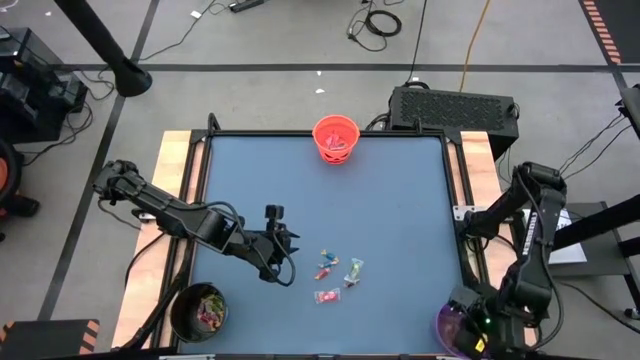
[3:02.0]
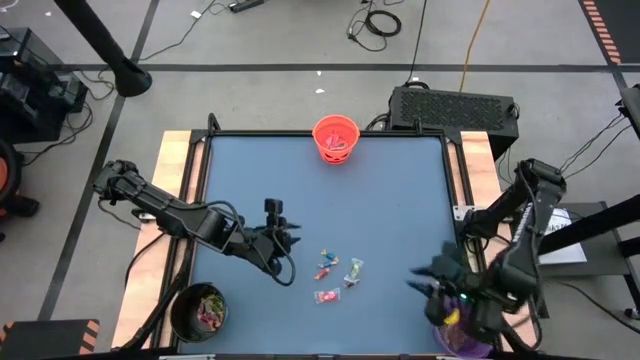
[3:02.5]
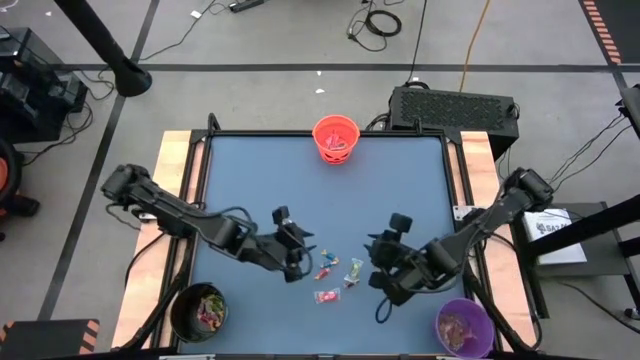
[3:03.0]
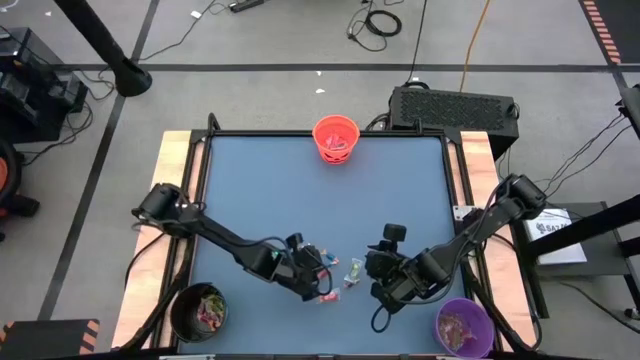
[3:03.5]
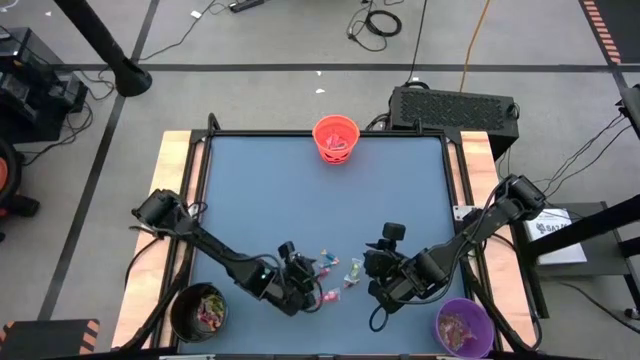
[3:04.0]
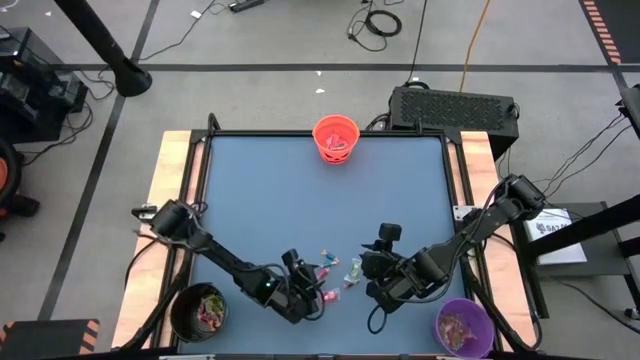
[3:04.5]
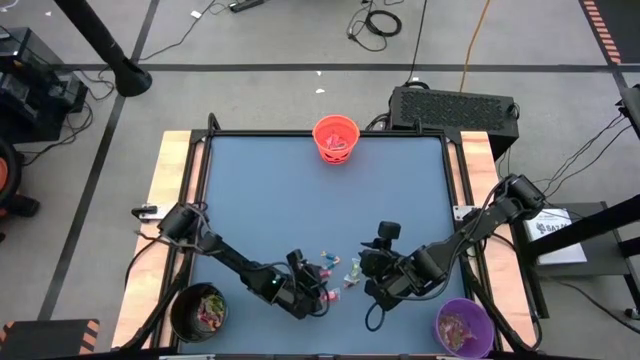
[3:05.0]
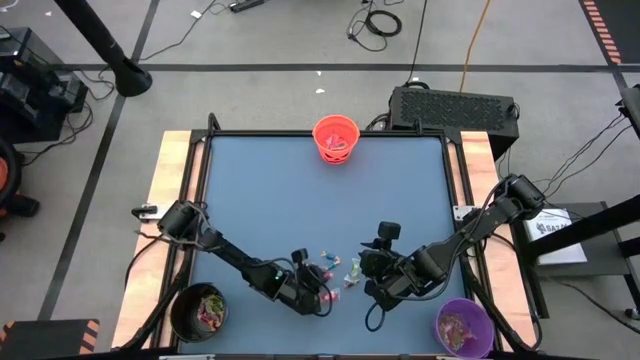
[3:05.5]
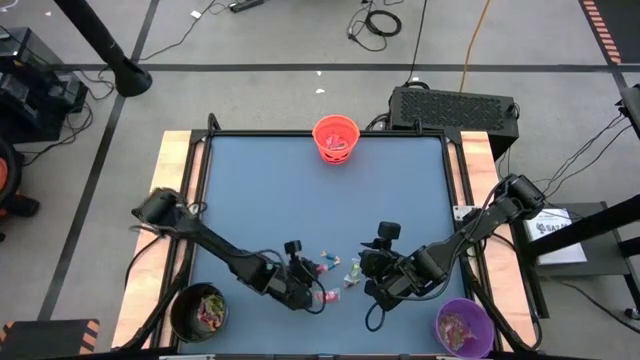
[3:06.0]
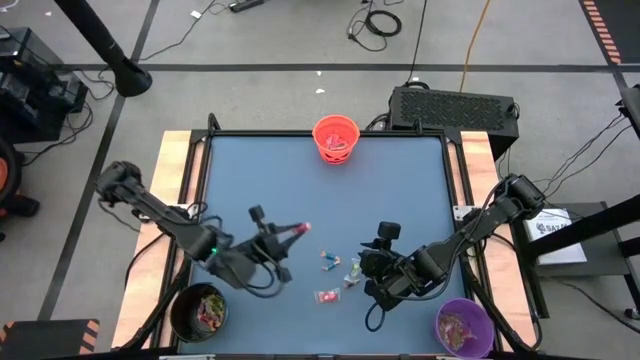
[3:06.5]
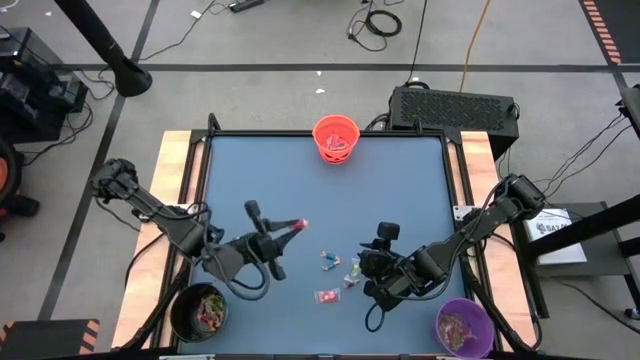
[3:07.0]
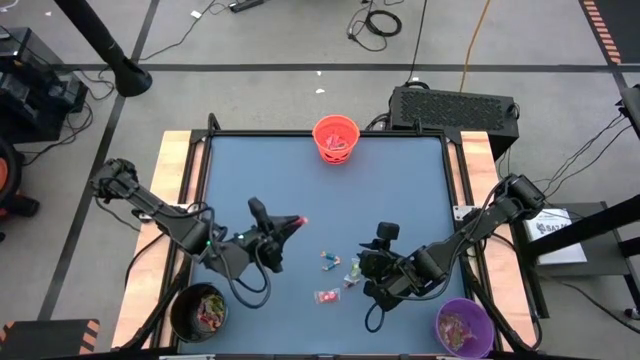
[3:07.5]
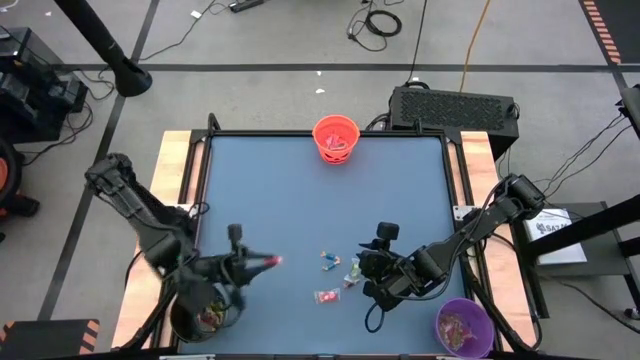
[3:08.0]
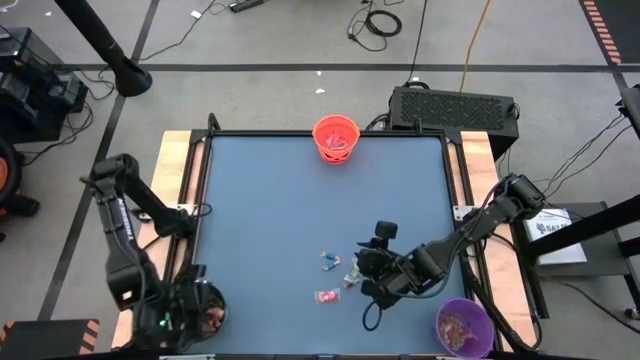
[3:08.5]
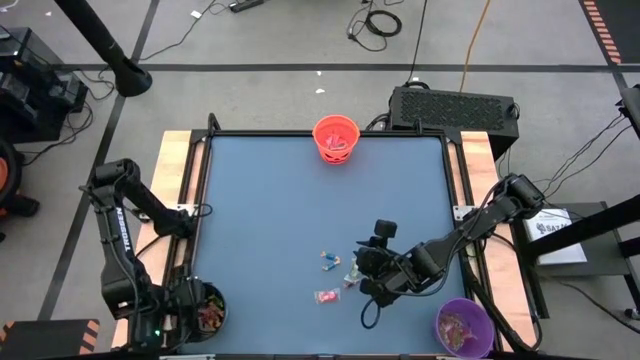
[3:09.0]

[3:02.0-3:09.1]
Task: Sort candy by brand, put in halloween buckets
Put the orange candy into the black bucket

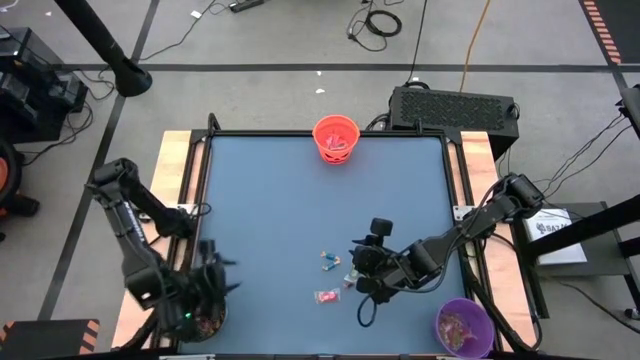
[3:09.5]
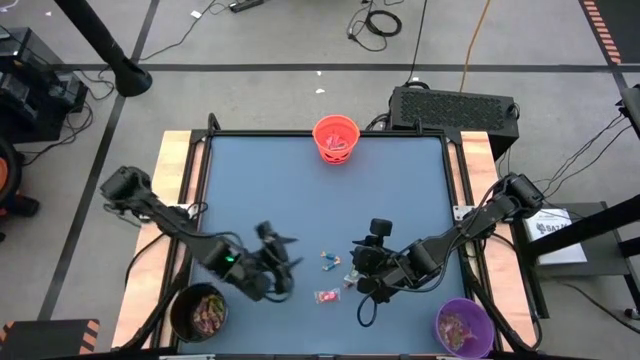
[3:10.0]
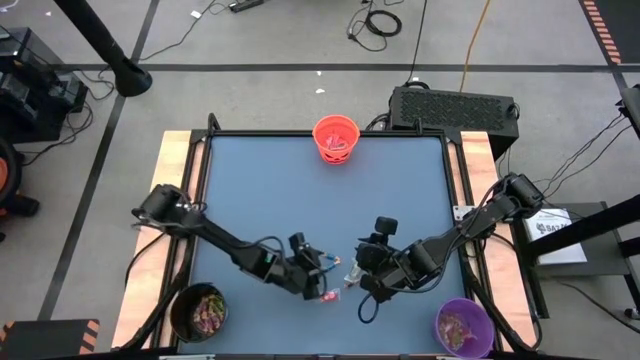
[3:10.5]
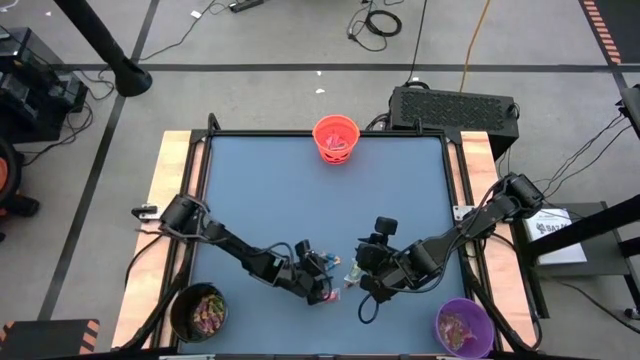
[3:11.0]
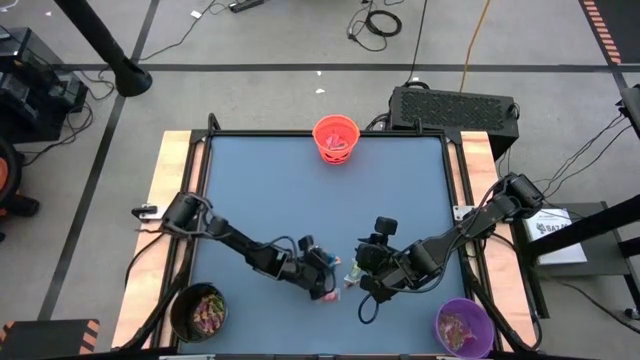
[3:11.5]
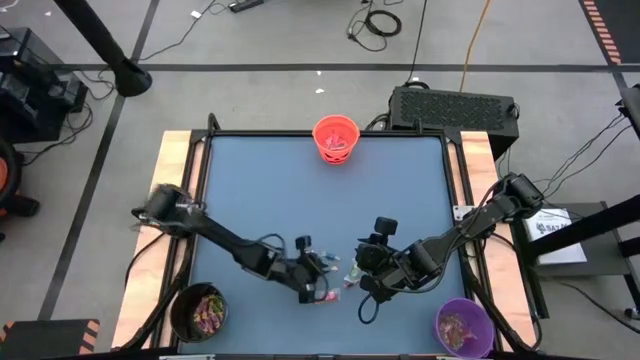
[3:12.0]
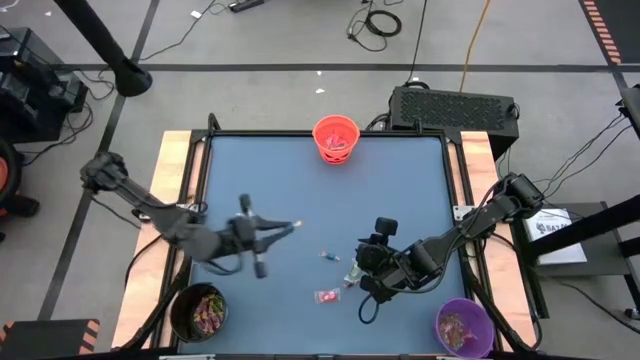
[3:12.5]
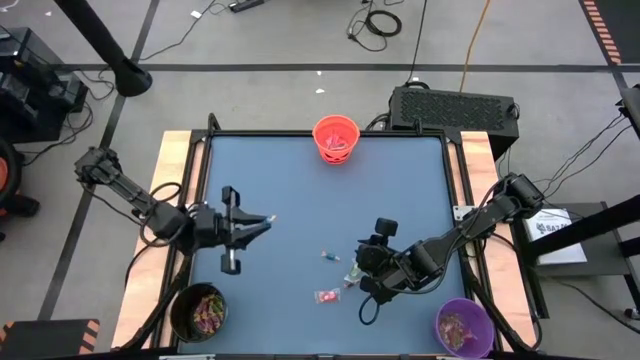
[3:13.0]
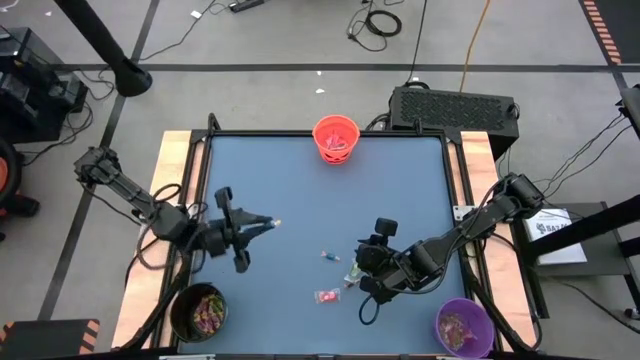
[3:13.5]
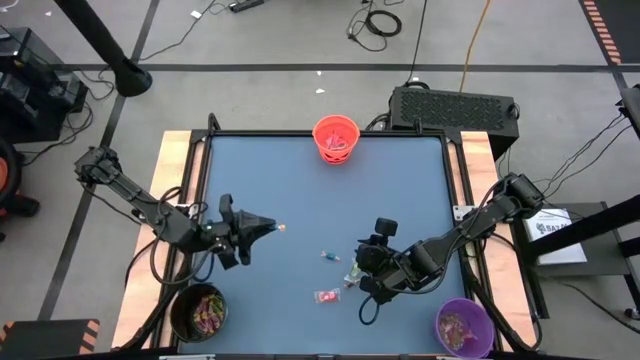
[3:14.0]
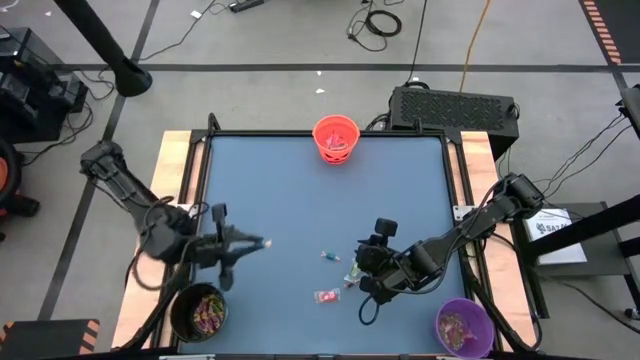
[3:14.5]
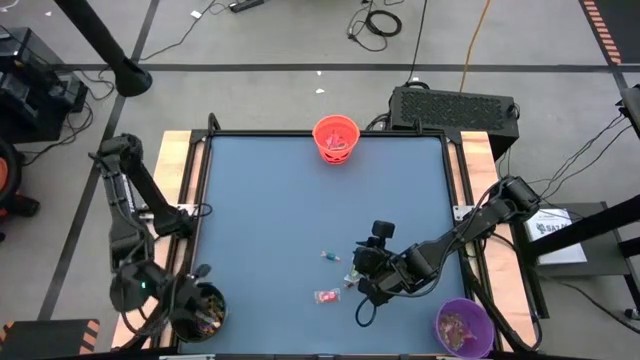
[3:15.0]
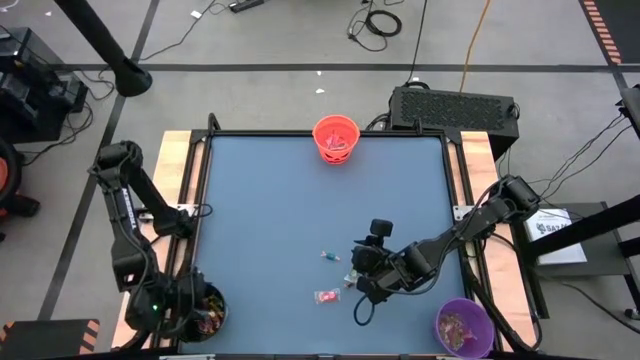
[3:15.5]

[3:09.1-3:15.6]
Put the blue candy into the black bucket

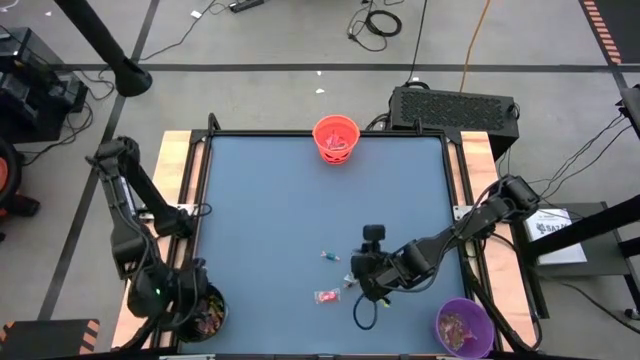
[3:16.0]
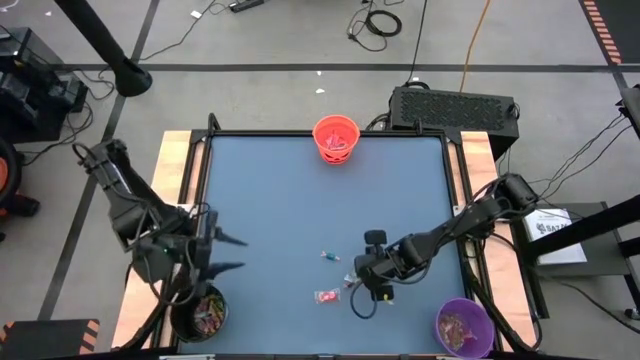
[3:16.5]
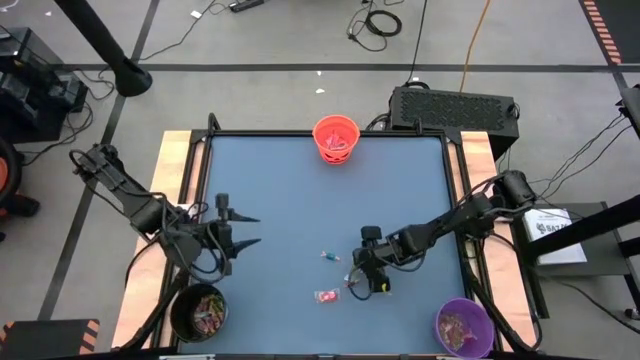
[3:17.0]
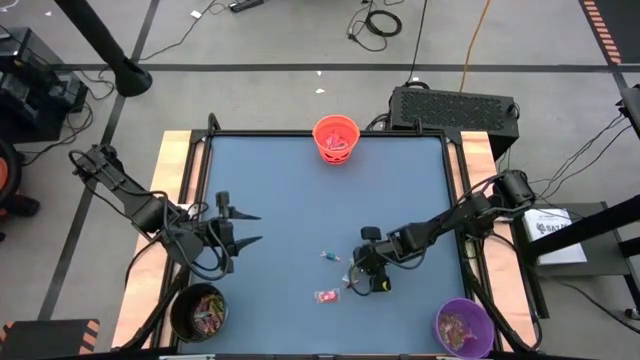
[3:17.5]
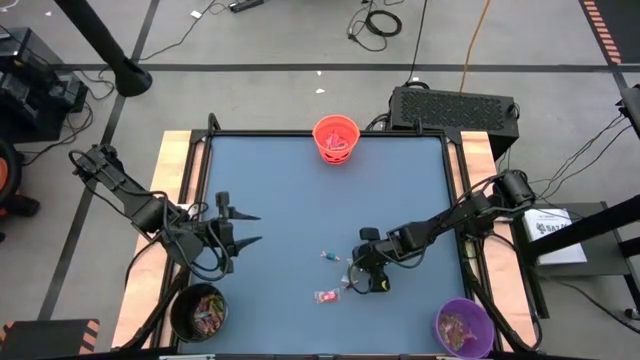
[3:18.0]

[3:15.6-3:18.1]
Put the small green gummy into the purple bucket

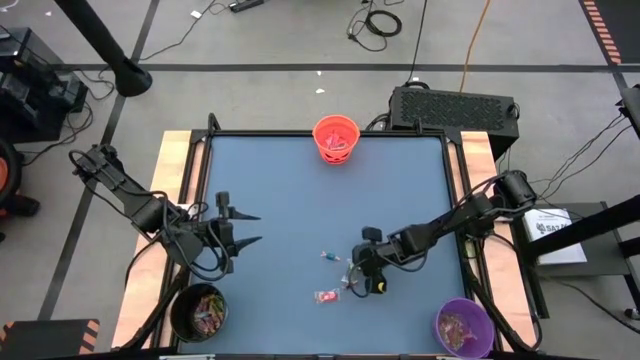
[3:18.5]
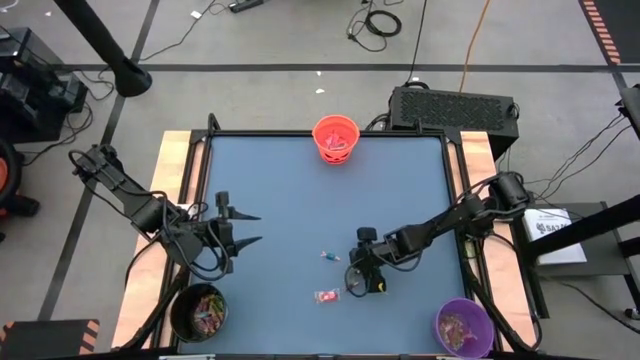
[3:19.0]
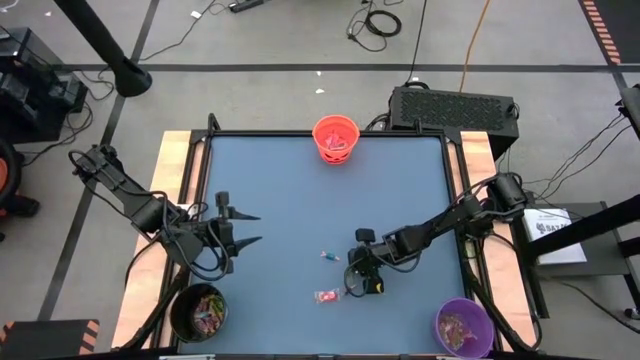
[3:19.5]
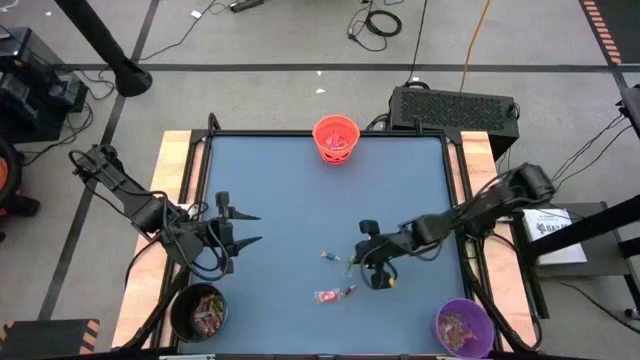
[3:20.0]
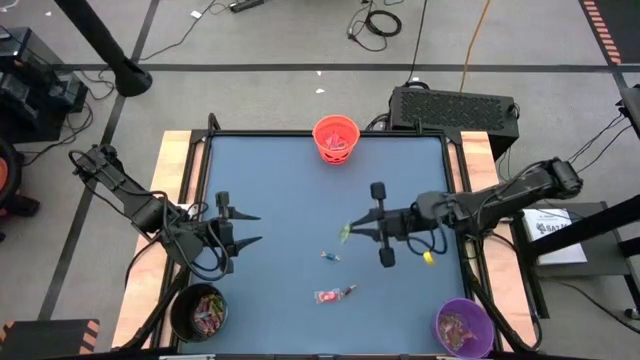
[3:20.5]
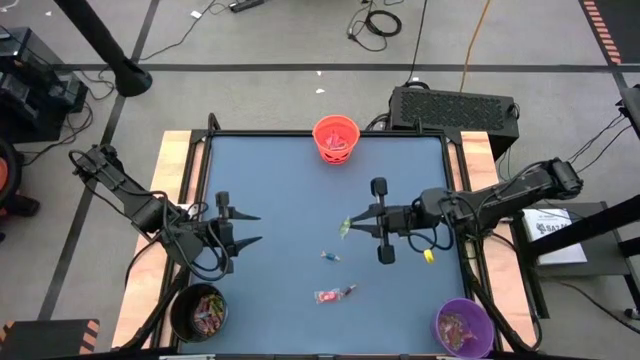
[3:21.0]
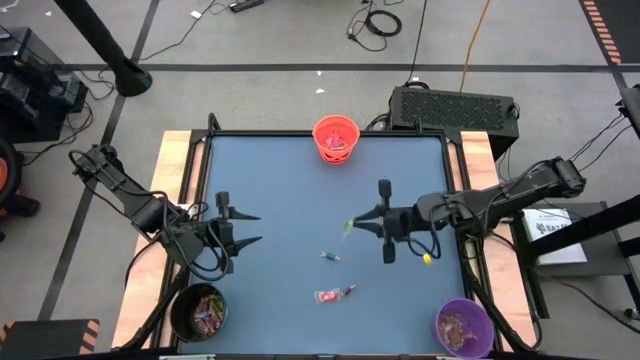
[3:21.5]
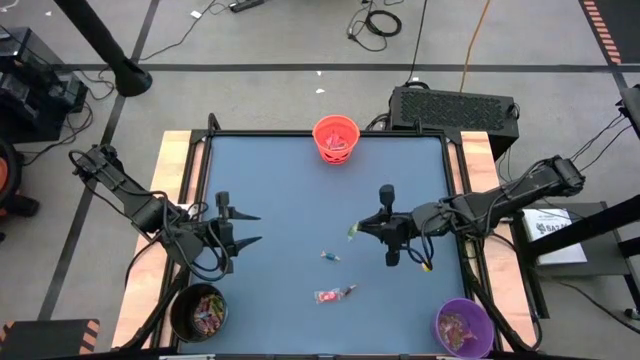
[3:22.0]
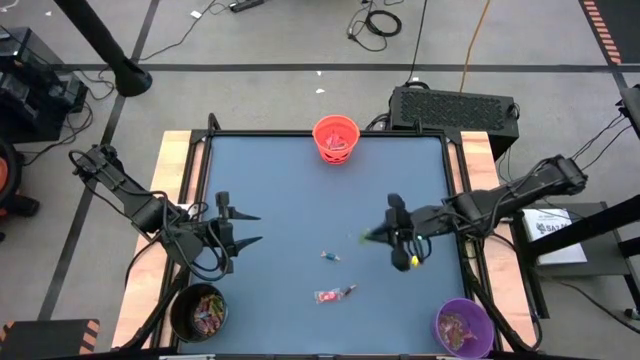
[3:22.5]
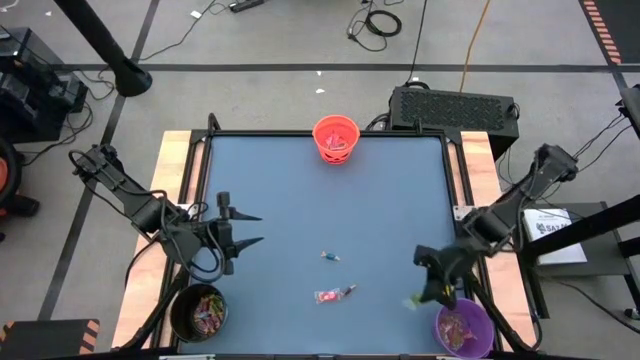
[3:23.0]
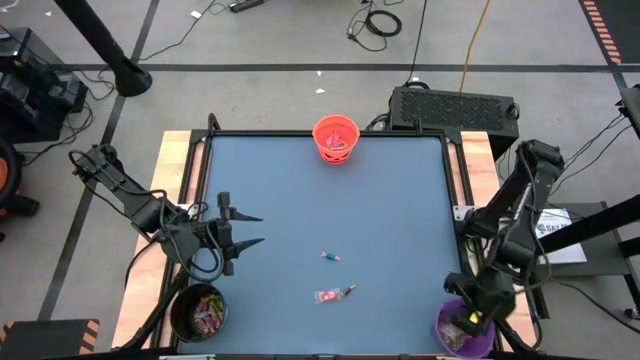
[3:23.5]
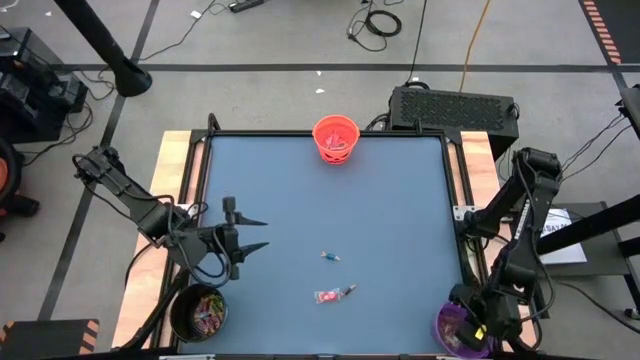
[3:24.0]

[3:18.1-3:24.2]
Put the small green gummy into the purple bucket
